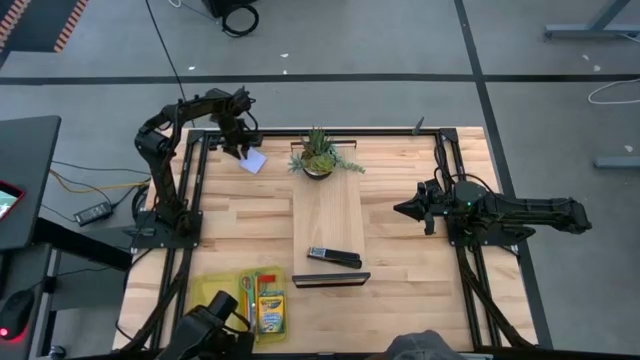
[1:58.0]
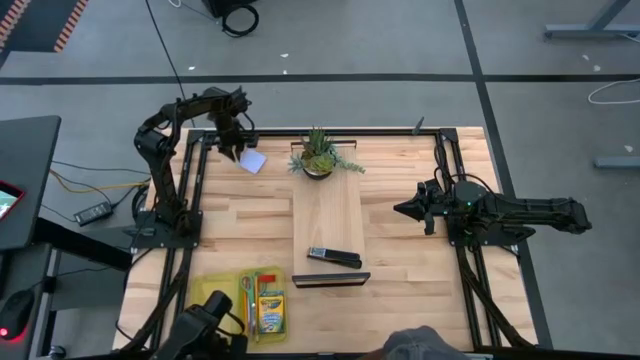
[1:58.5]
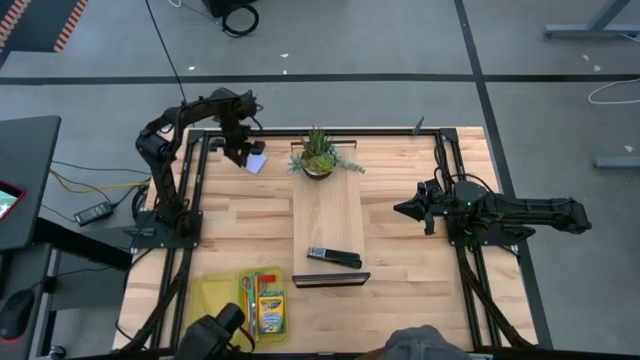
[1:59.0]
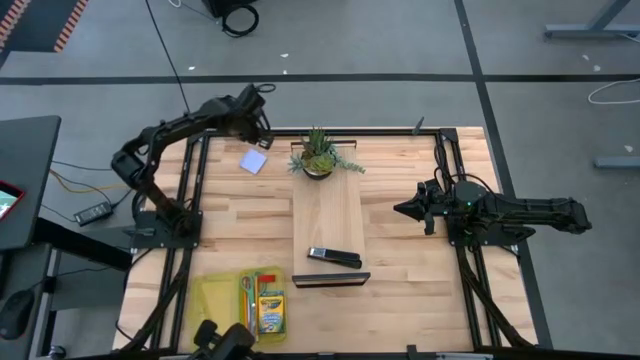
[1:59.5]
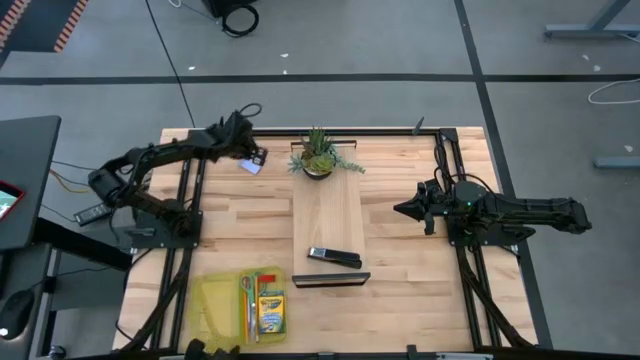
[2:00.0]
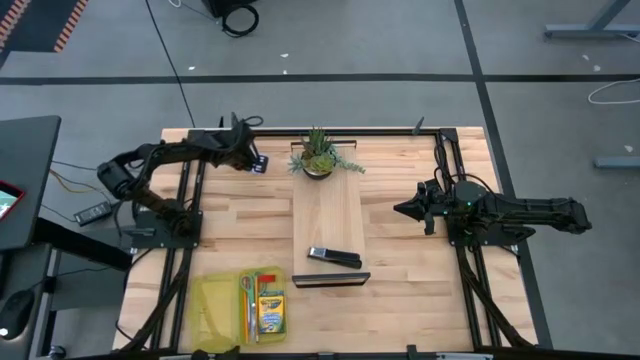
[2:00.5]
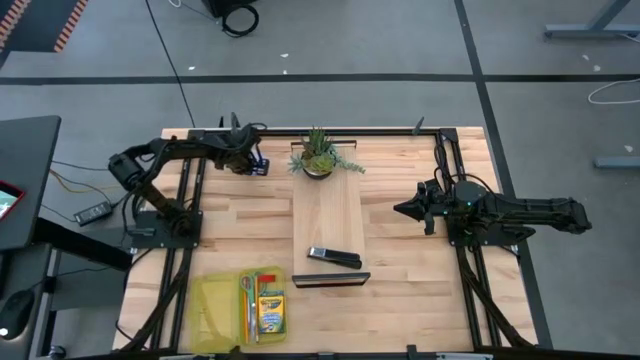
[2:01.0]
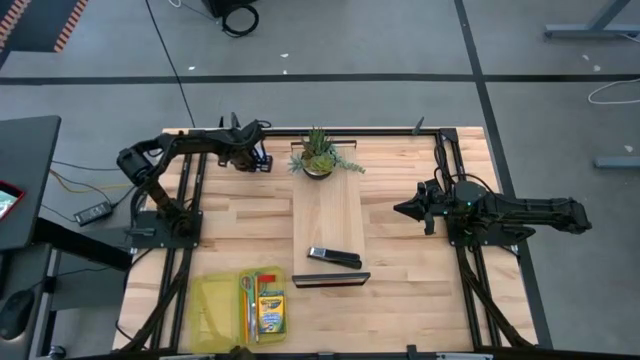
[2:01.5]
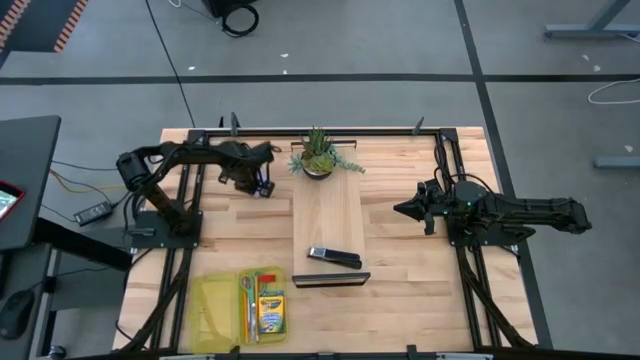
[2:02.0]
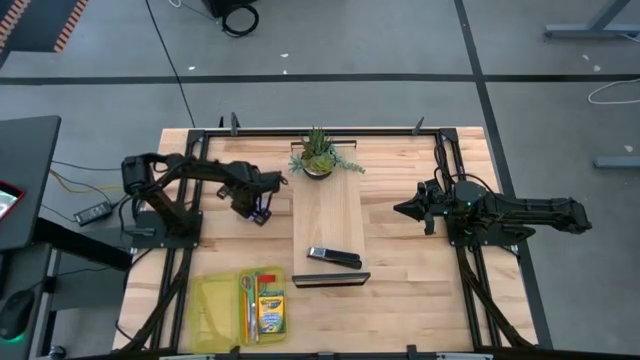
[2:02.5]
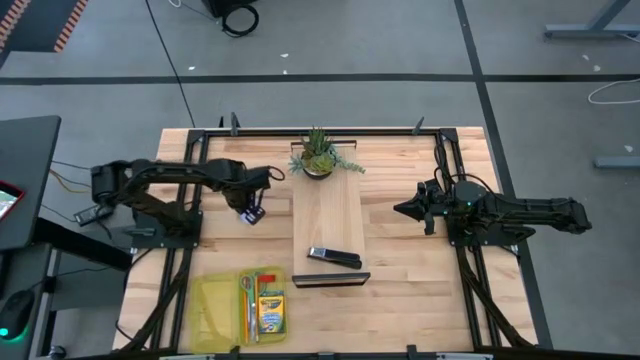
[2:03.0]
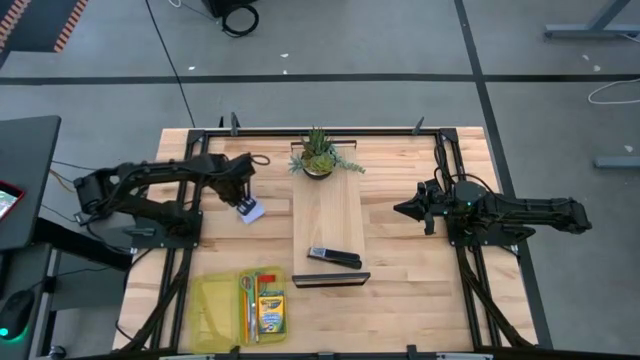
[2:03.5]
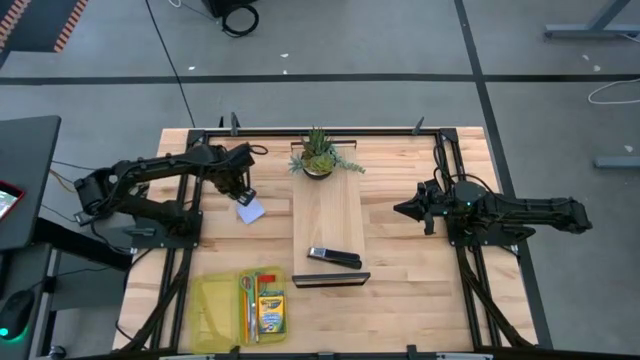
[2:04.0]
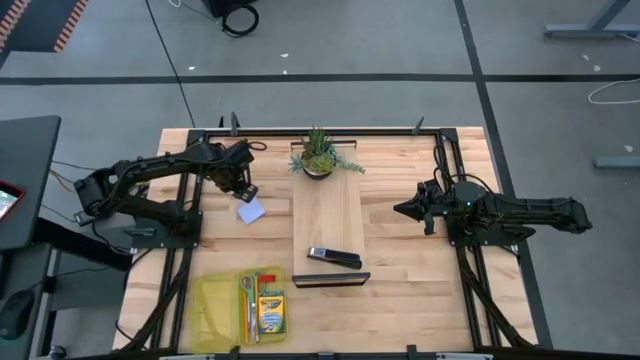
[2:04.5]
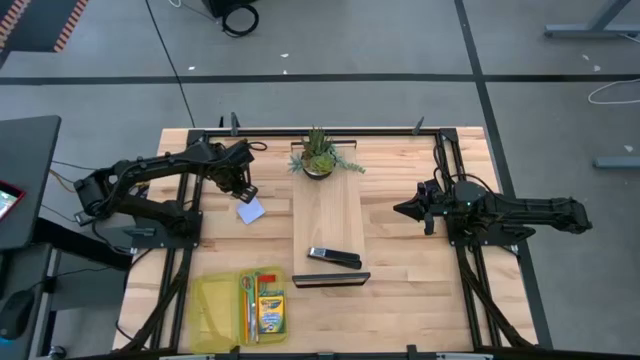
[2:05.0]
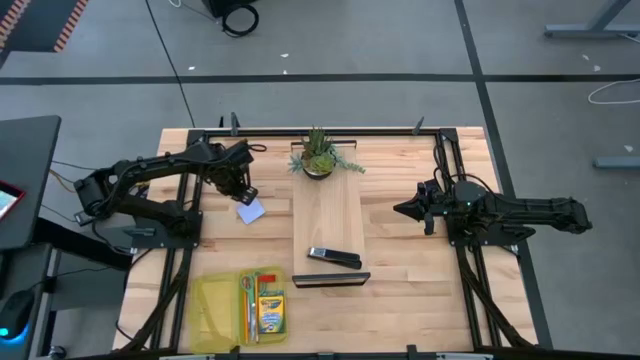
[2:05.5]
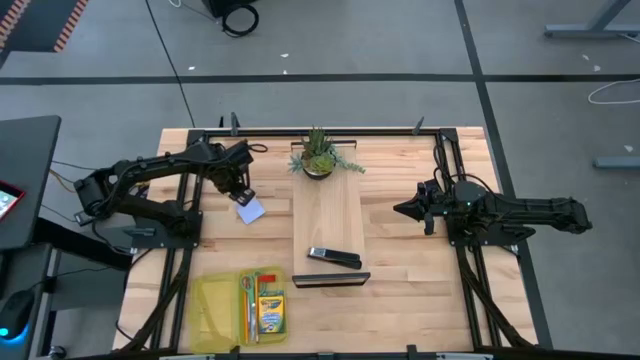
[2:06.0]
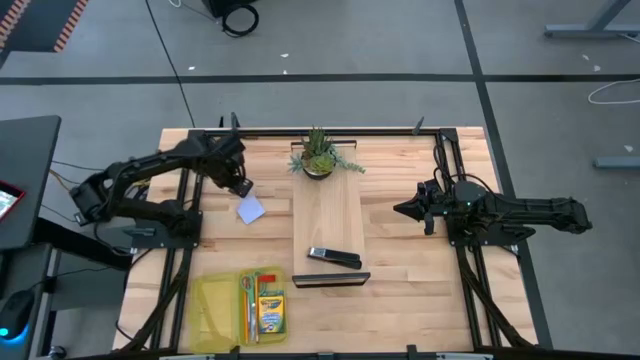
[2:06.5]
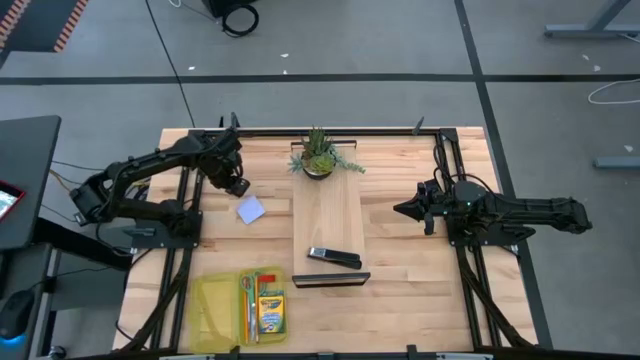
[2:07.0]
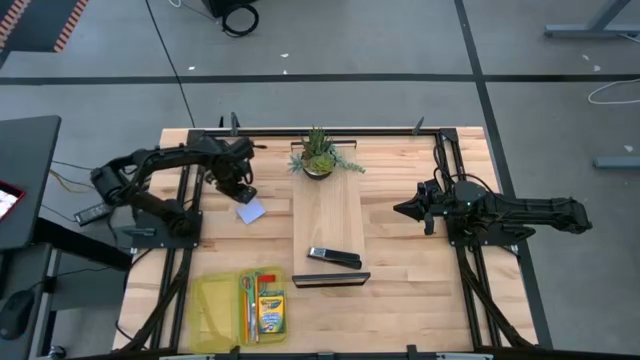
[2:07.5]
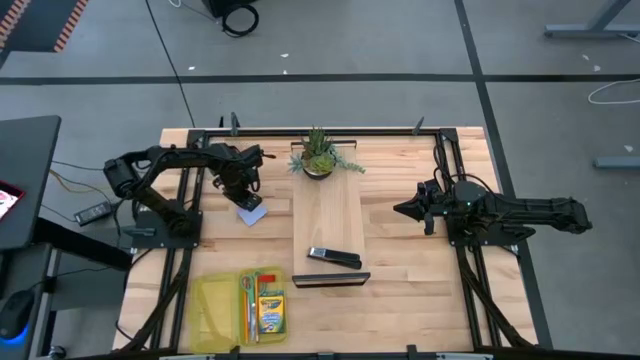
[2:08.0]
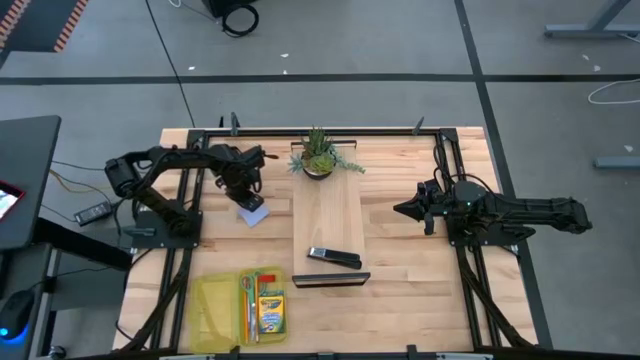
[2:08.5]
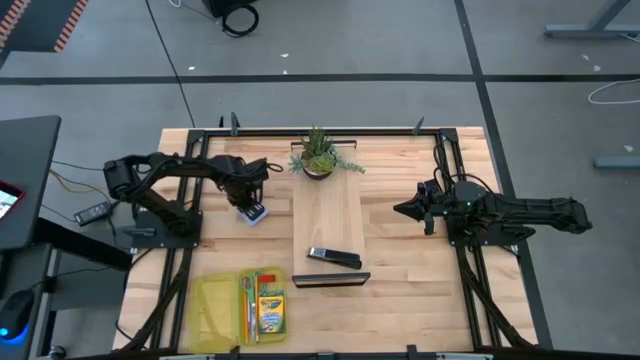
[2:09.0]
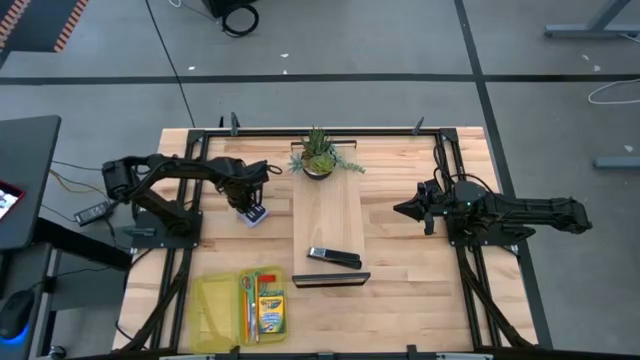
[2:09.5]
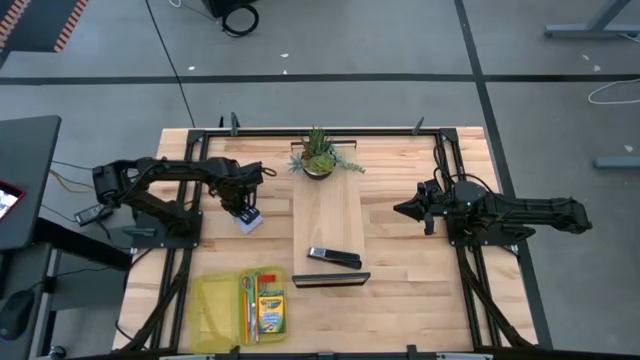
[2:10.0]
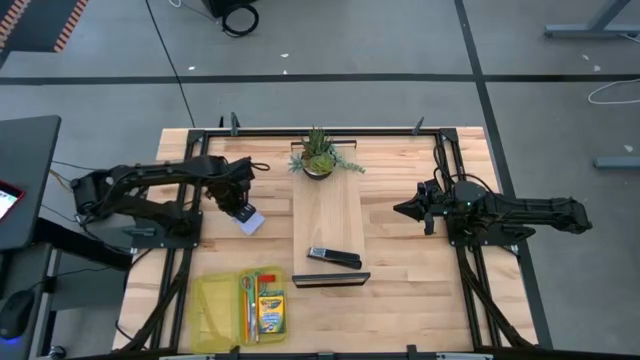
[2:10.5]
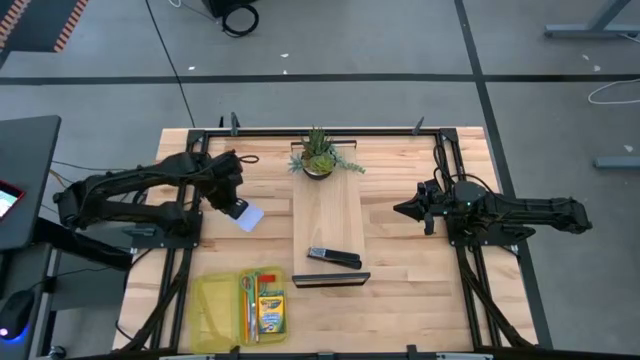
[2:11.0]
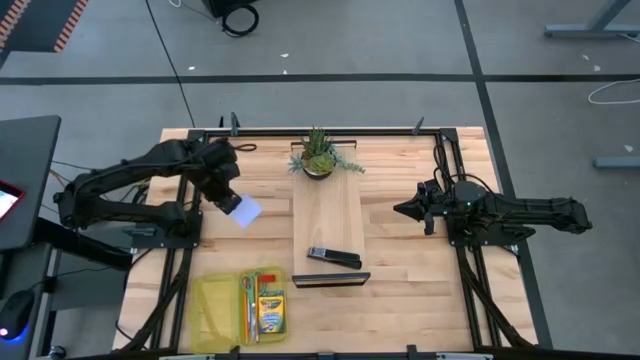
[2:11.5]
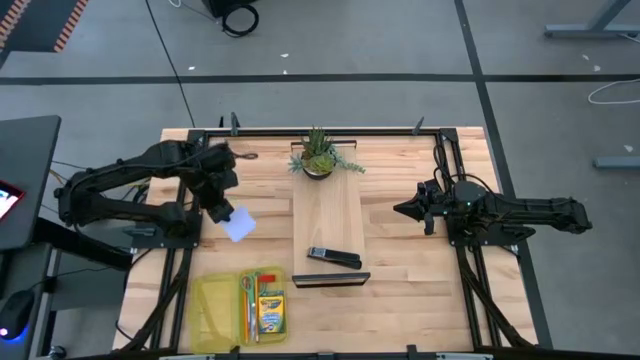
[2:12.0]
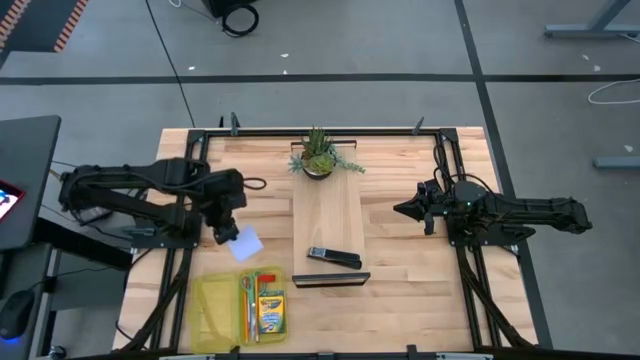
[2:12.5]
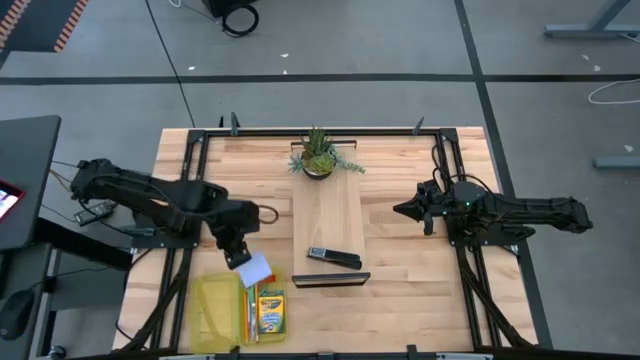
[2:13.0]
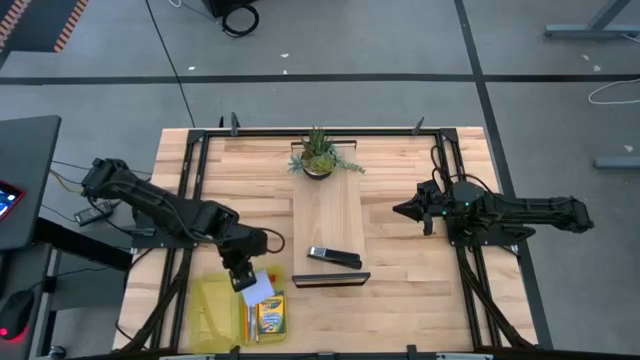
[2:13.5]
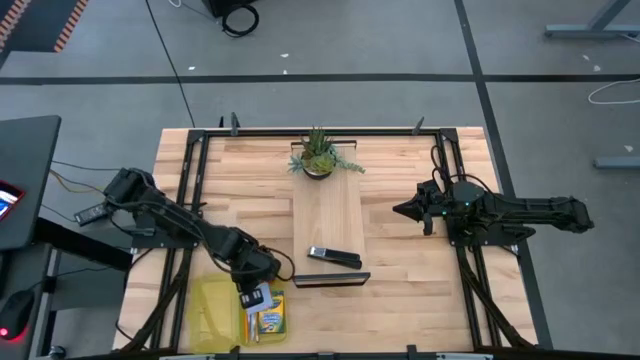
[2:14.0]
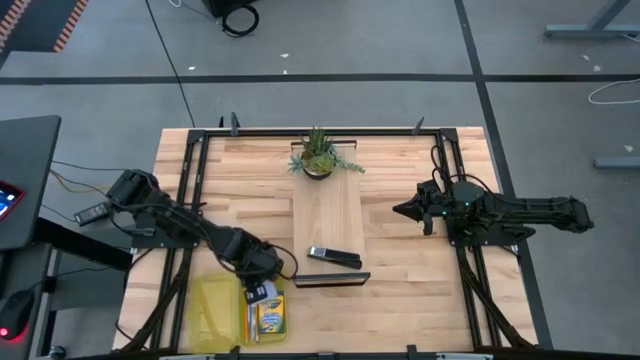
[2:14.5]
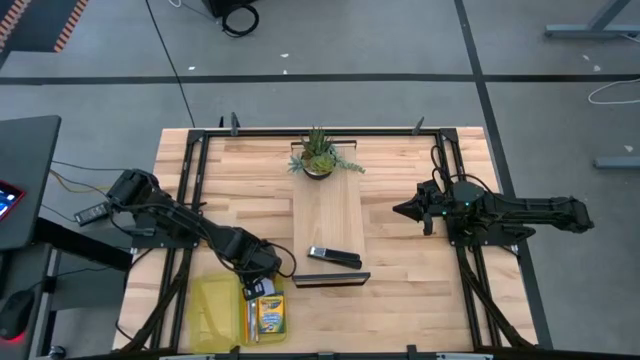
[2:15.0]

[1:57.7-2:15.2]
Task: Pack school essentials
Put the blue sticky note into the yellow supply box
